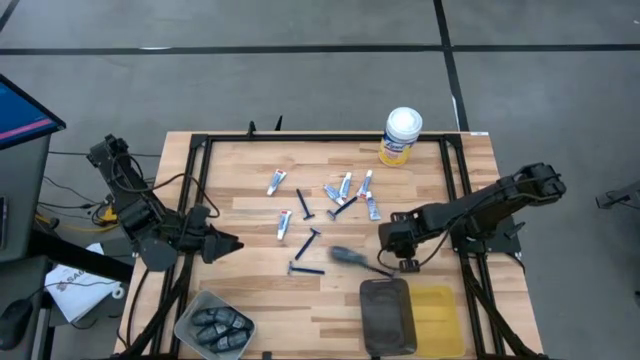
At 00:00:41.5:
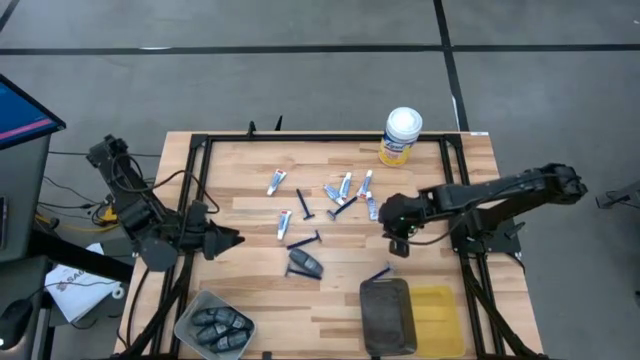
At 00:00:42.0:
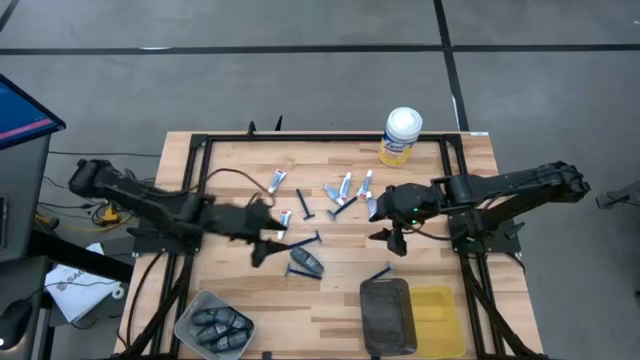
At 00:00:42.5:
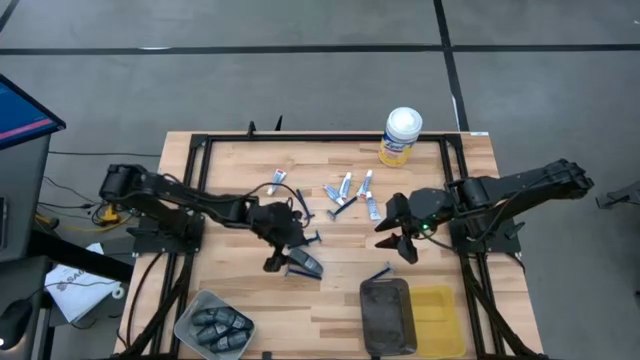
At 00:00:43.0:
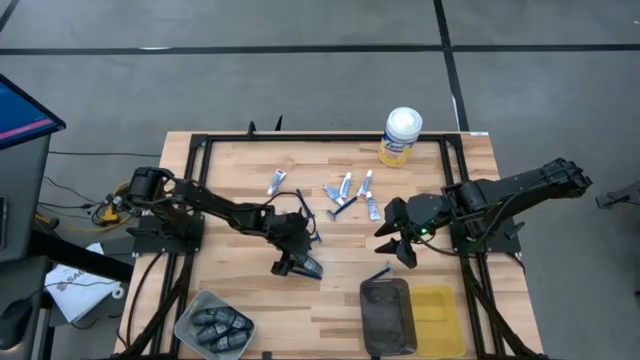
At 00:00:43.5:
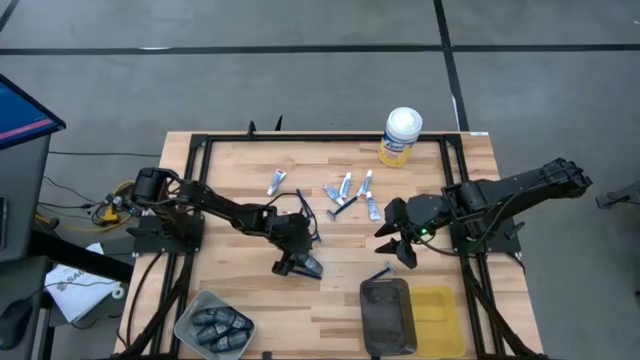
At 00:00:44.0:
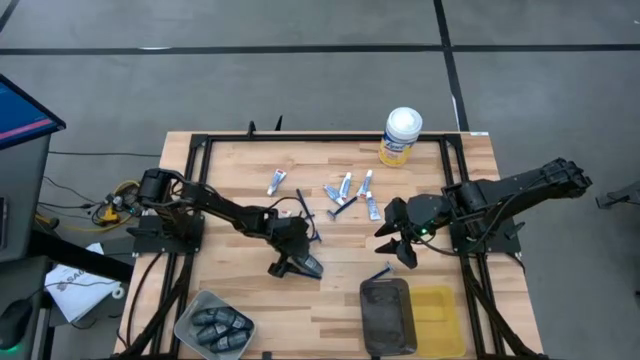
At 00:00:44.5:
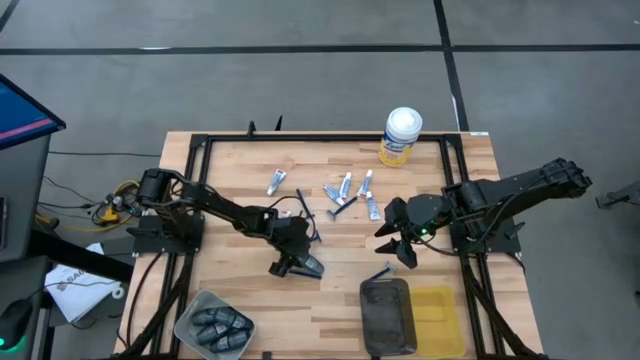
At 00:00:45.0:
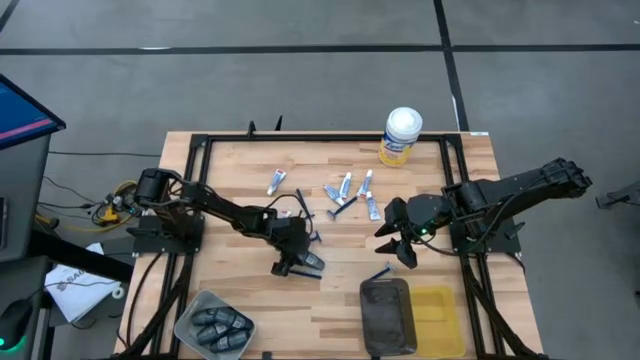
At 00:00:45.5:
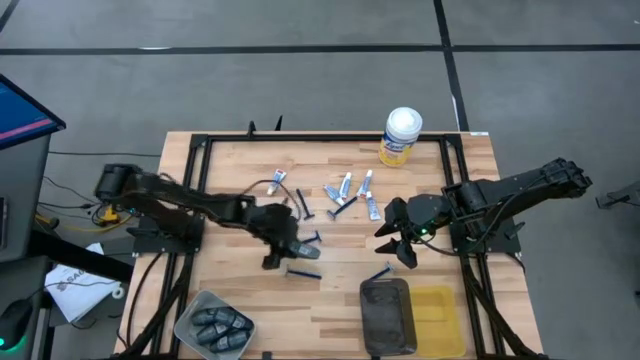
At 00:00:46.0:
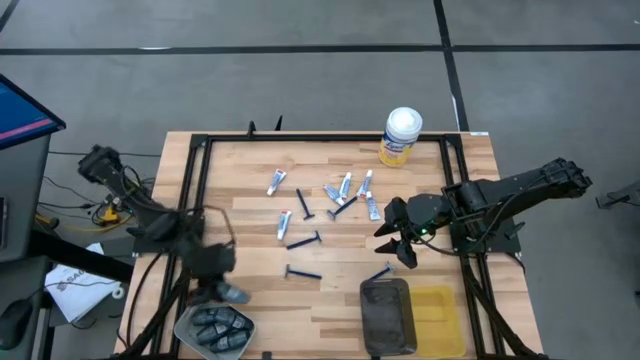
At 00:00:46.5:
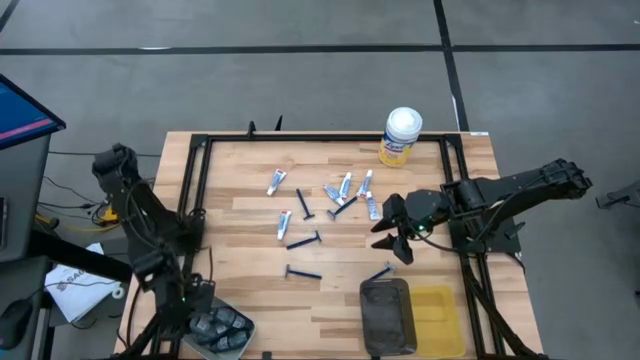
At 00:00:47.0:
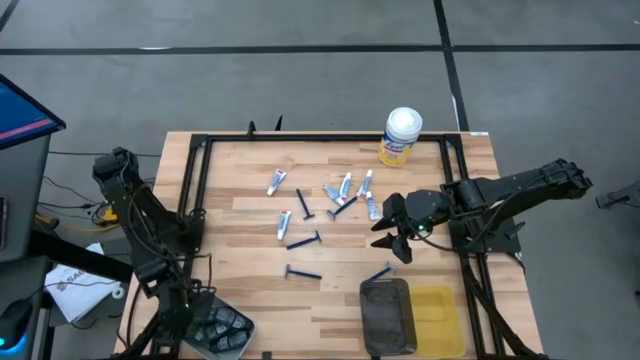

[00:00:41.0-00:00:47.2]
Task: Pick & Place Travel size toiletries
Put the deodorant into the gray bin

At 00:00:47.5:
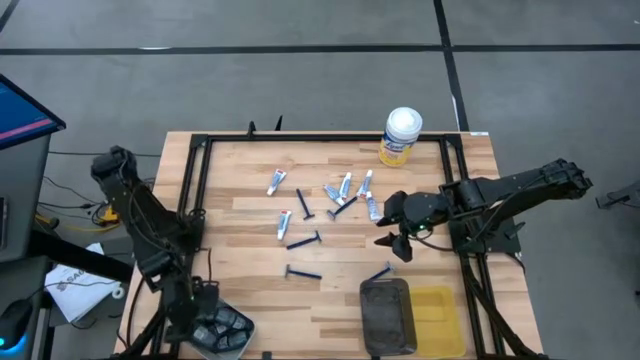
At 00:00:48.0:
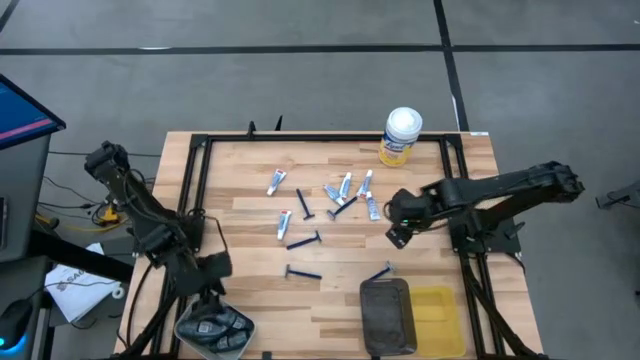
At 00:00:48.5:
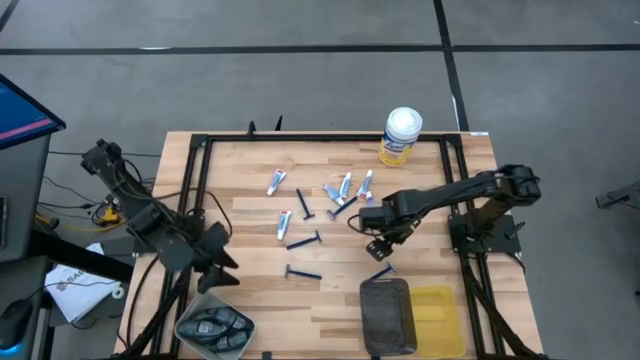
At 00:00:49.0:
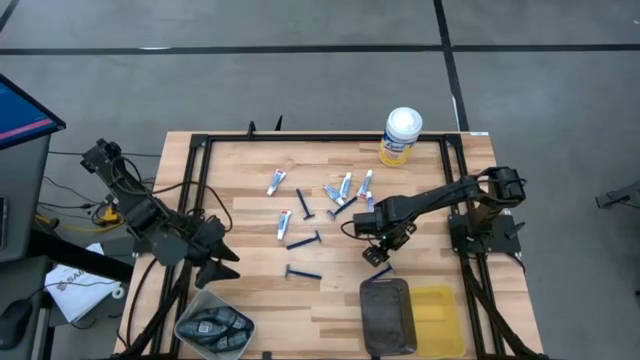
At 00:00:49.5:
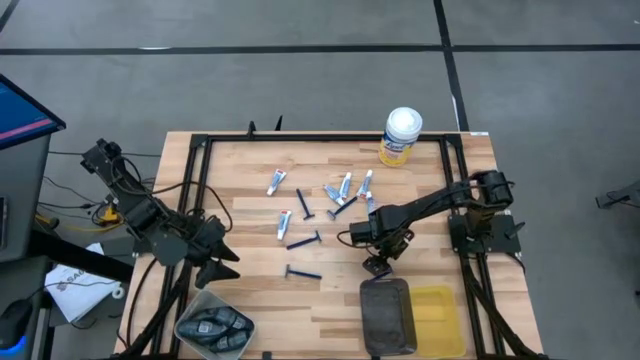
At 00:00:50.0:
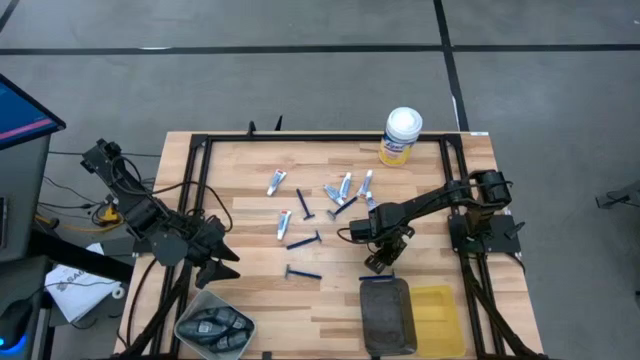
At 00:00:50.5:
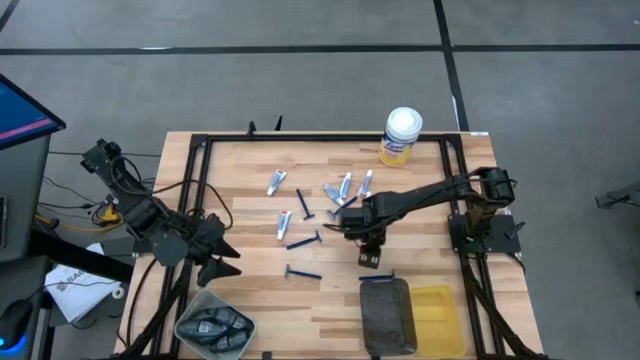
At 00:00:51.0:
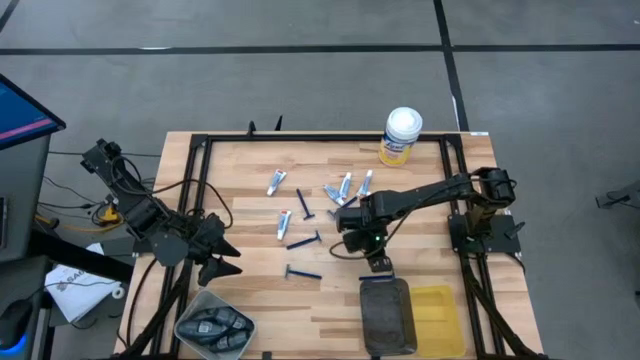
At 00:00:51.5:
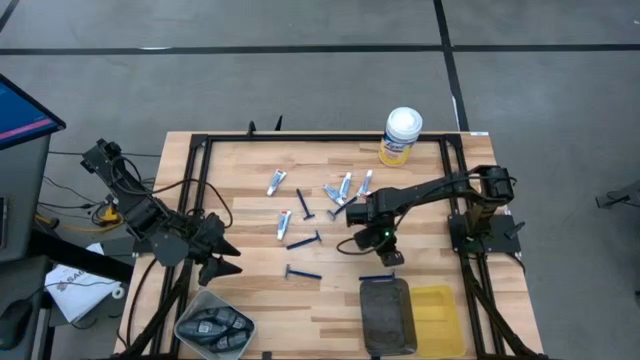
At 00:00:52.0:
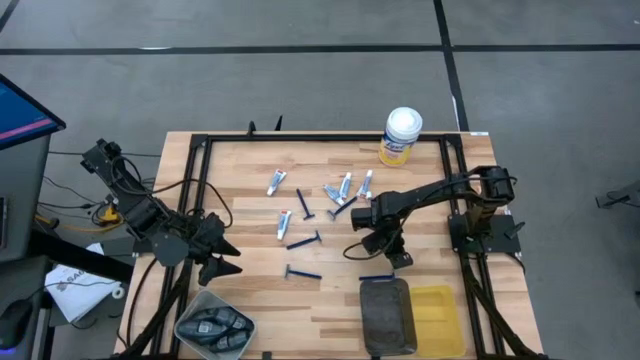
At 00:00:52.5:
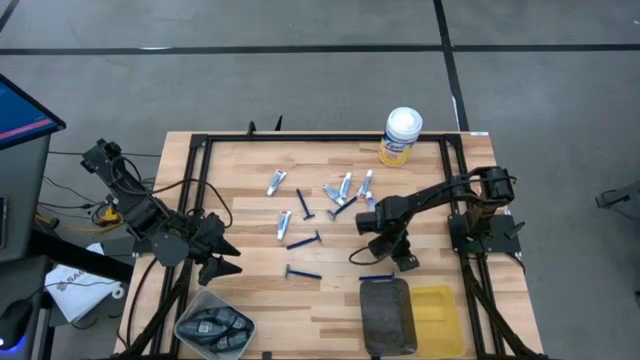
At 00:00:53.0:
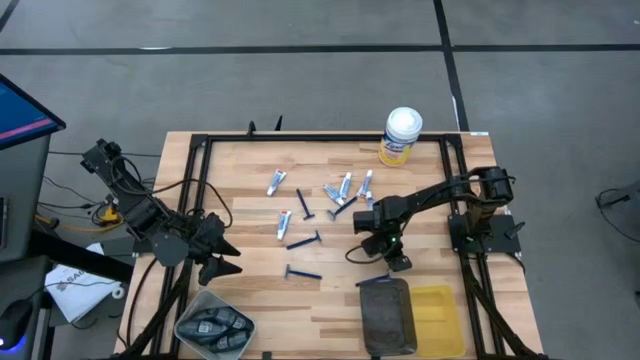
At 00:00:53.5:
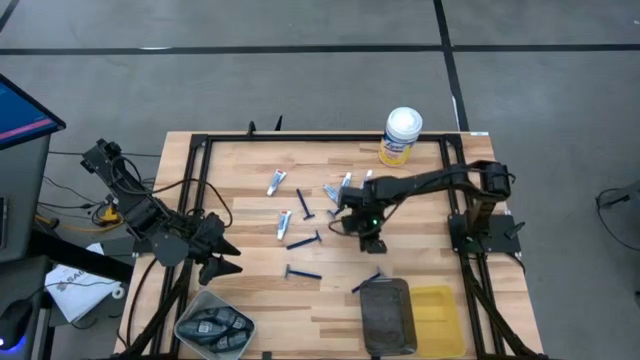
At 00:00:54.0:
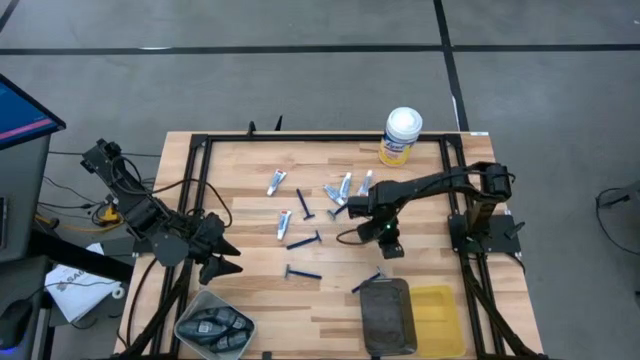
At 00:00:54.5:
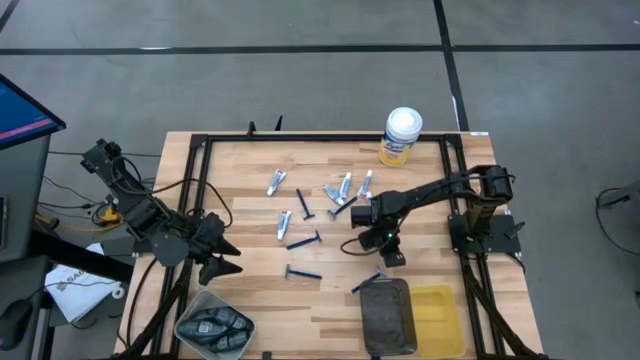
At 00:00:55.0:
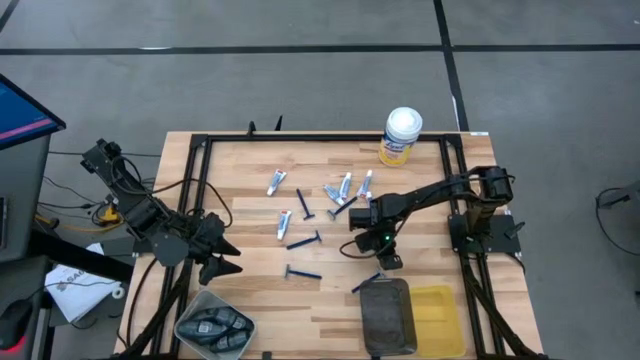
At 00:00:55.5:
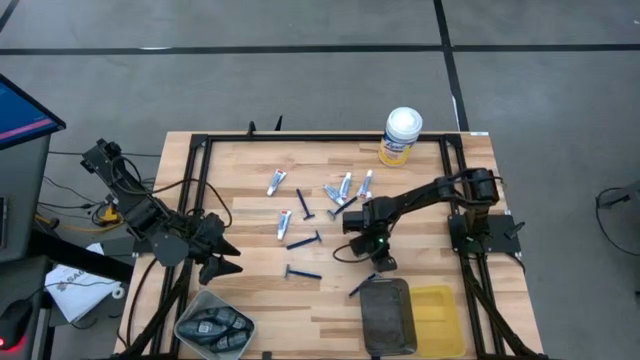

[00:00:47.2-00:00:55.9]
Put the razor into the yellow bin

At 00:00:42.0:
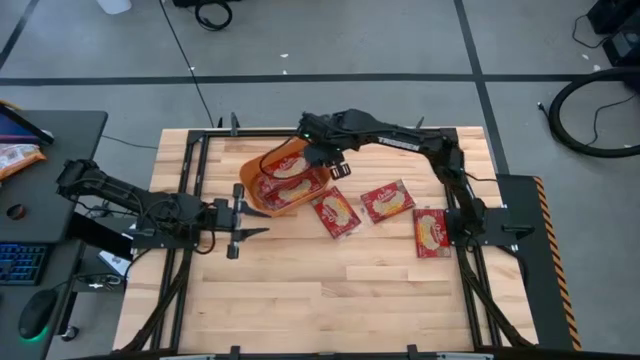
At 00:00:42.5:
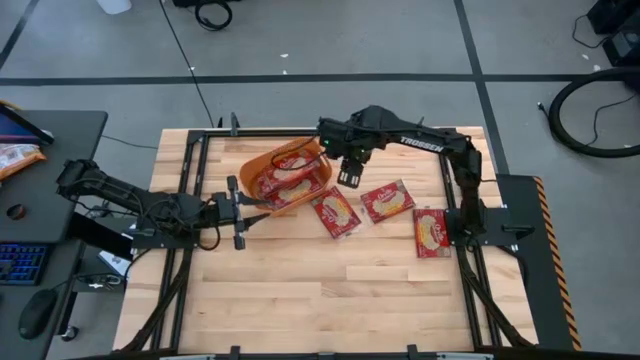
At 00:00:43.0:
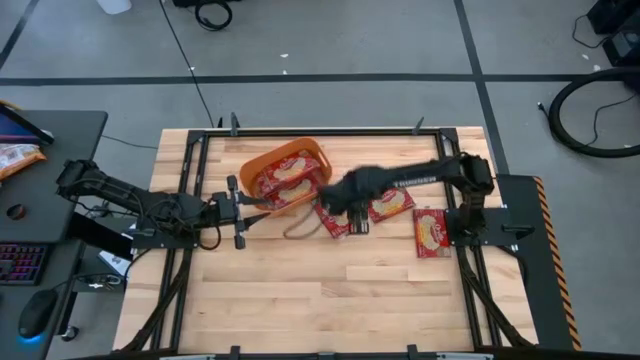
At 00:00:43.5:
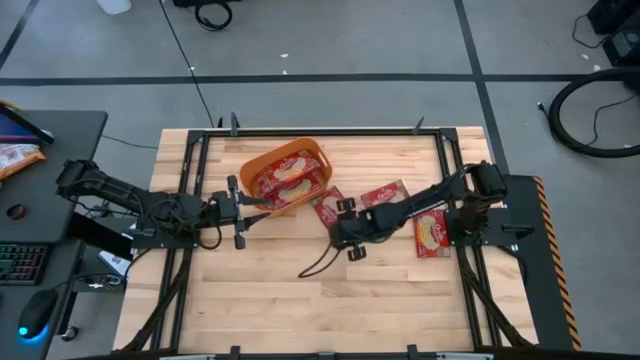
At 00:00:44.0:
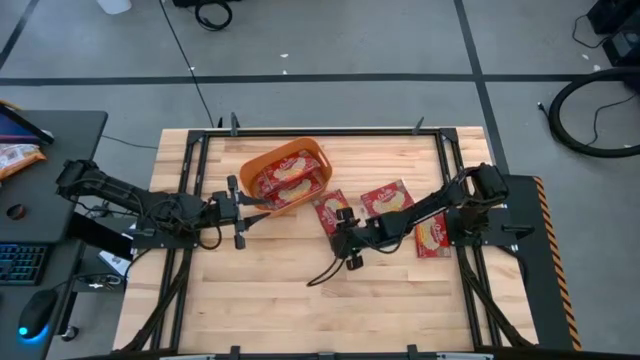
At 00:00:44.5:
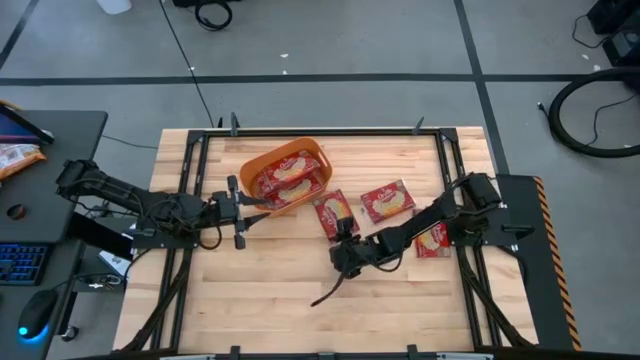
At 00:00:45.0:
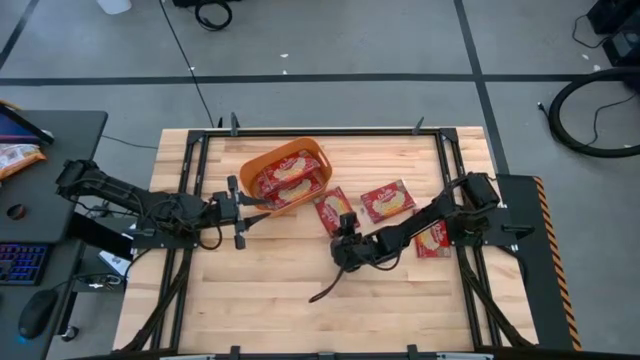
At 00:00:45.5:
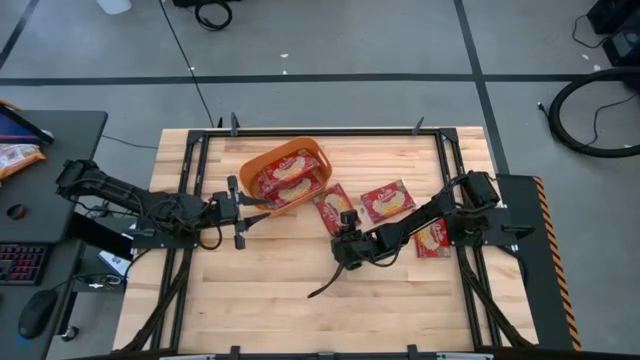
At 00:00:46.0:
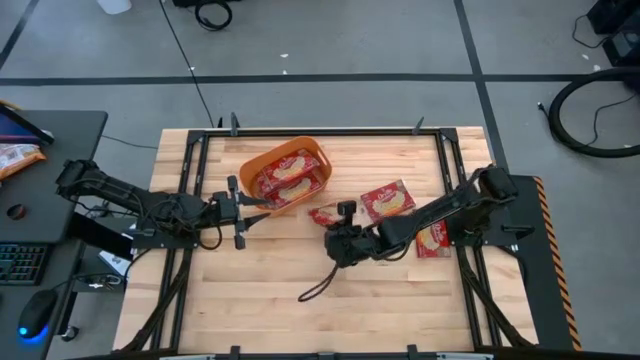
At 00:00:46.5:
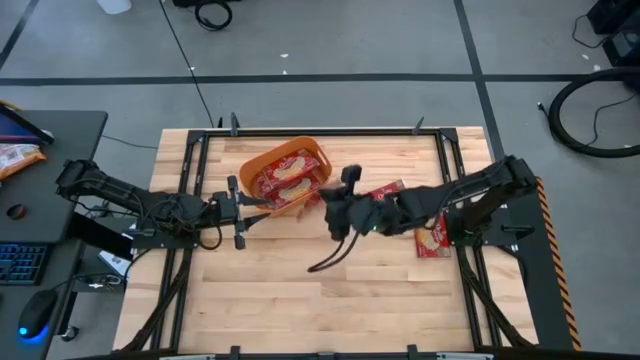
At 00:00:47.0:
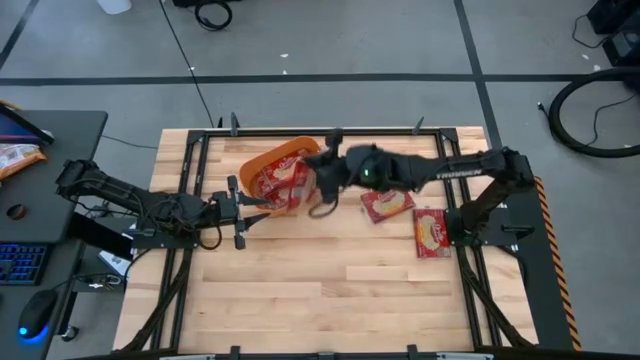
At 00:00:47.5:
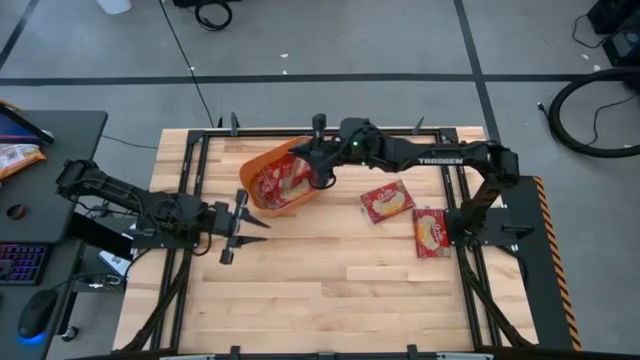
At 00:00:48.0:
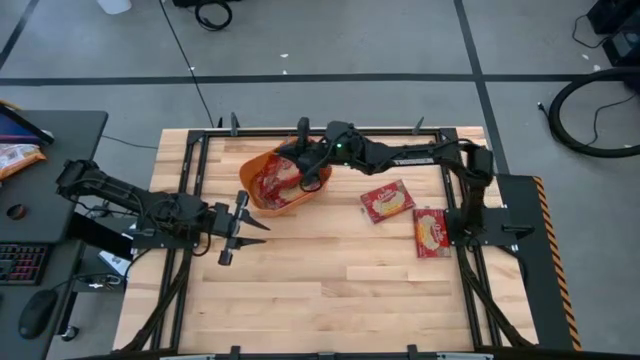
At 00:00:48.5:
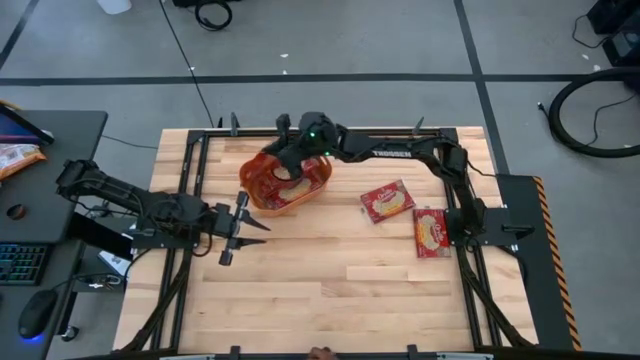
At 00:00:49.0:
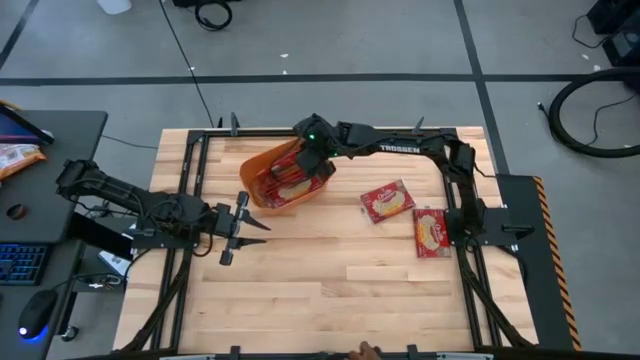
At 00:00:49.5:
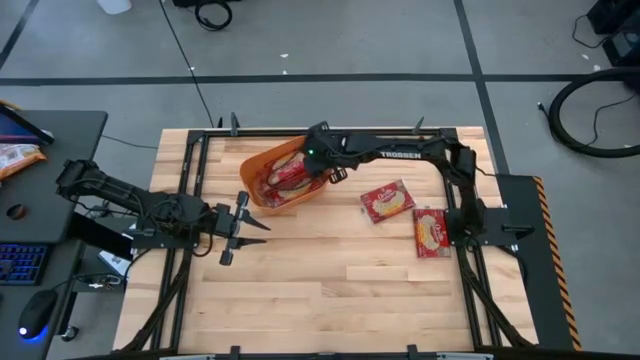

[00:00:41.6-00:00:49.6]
Task: Sort popcorn bags into baskets
Put the red popcorn bag into the orange bin
